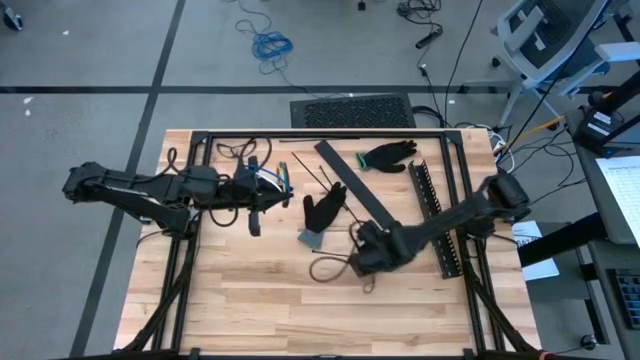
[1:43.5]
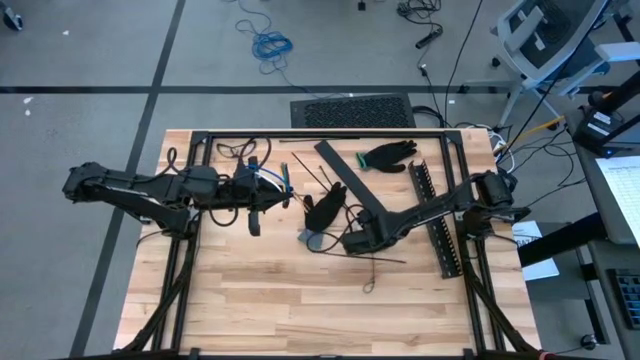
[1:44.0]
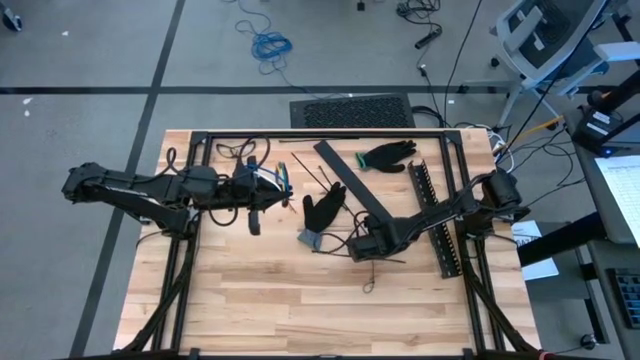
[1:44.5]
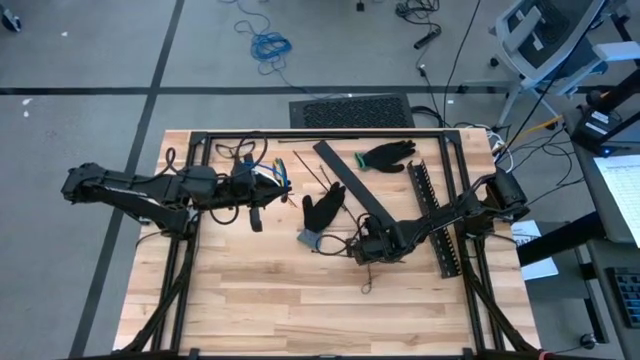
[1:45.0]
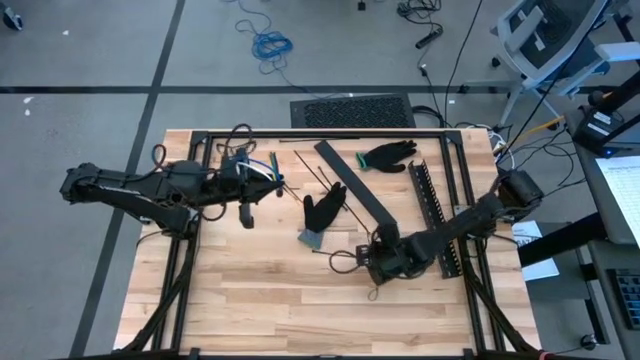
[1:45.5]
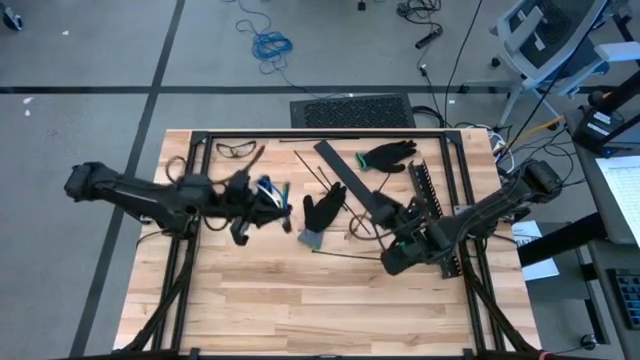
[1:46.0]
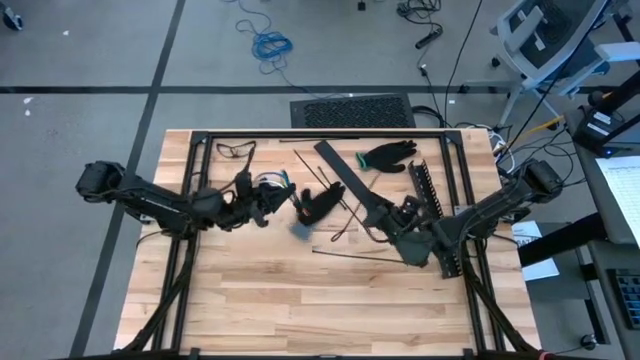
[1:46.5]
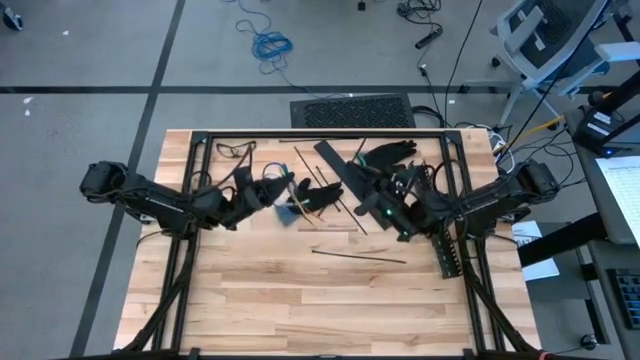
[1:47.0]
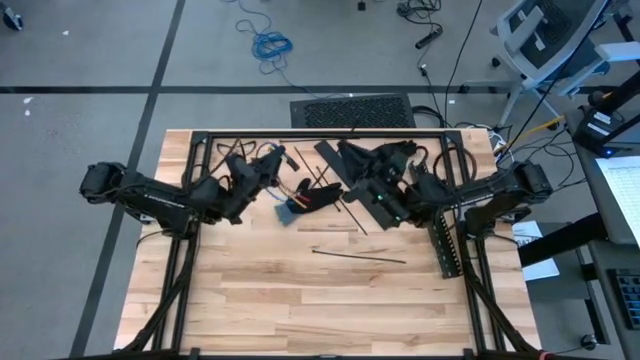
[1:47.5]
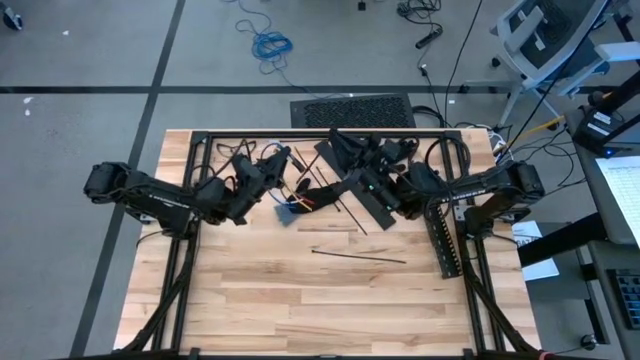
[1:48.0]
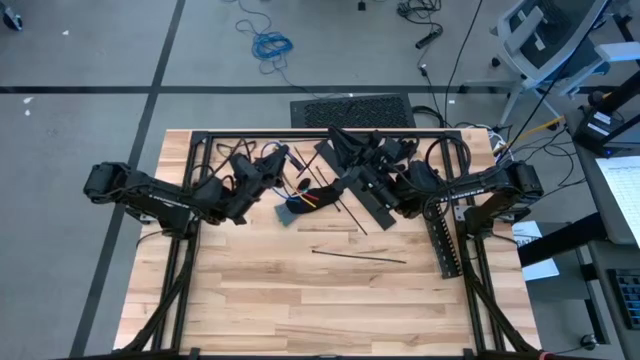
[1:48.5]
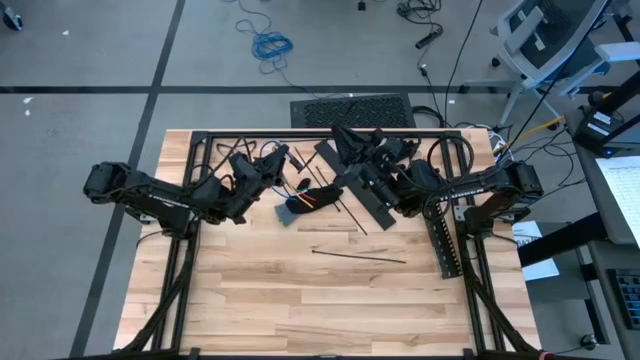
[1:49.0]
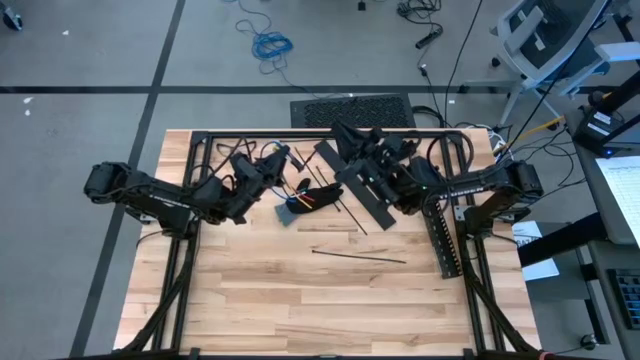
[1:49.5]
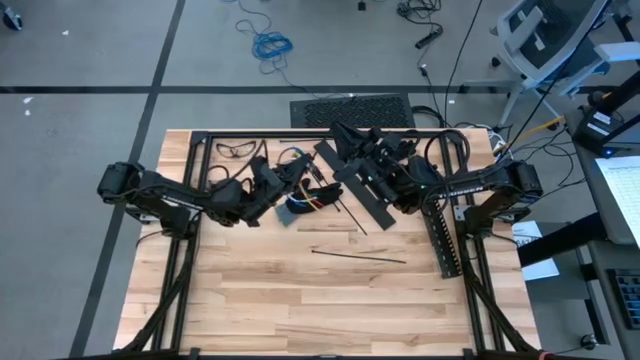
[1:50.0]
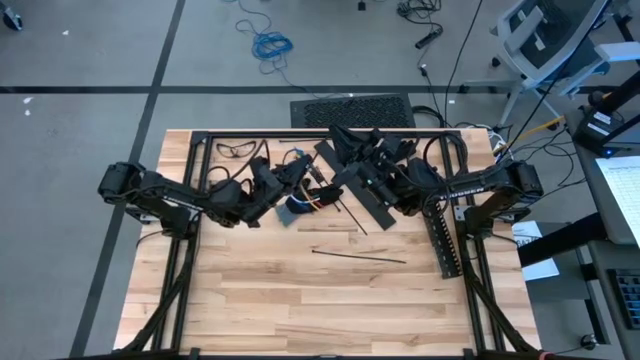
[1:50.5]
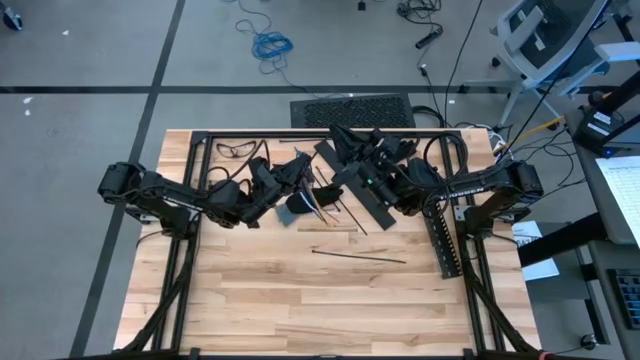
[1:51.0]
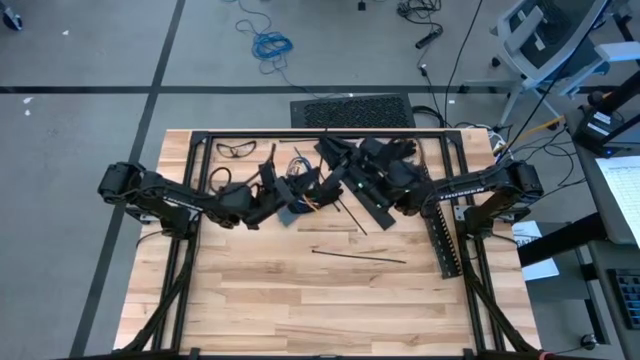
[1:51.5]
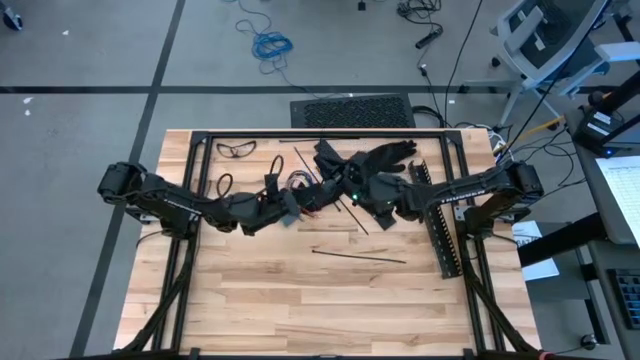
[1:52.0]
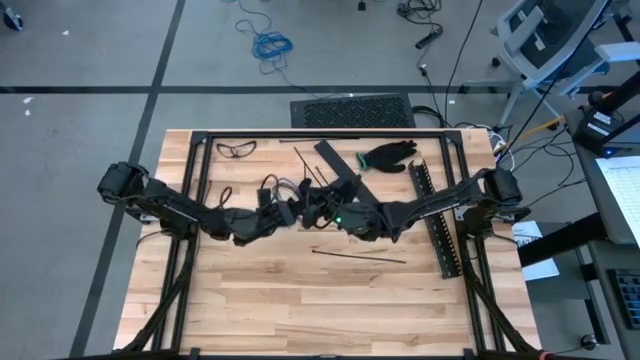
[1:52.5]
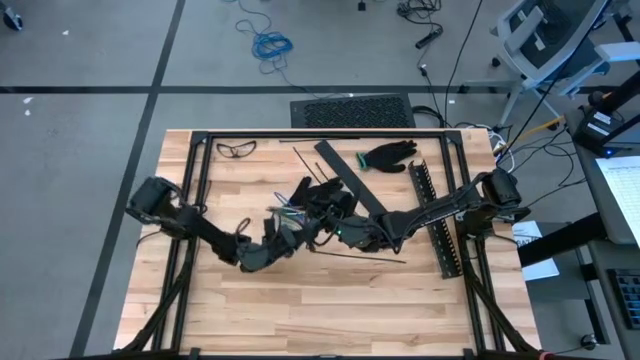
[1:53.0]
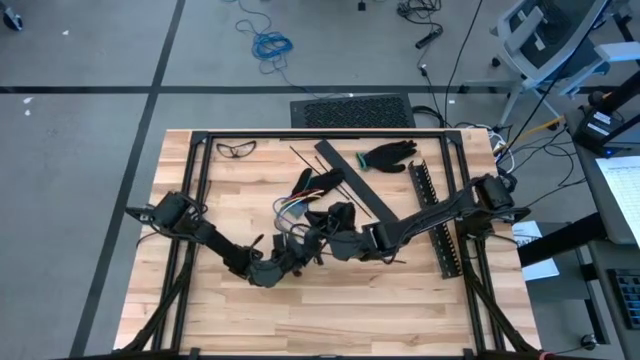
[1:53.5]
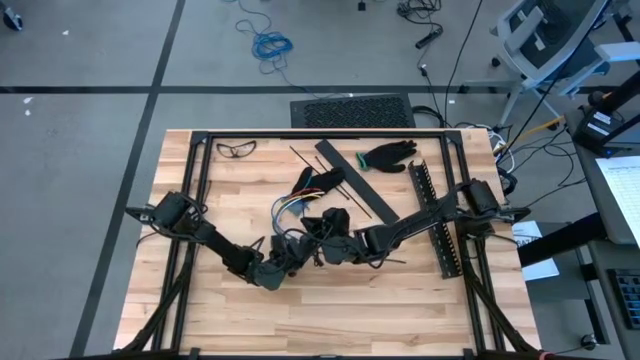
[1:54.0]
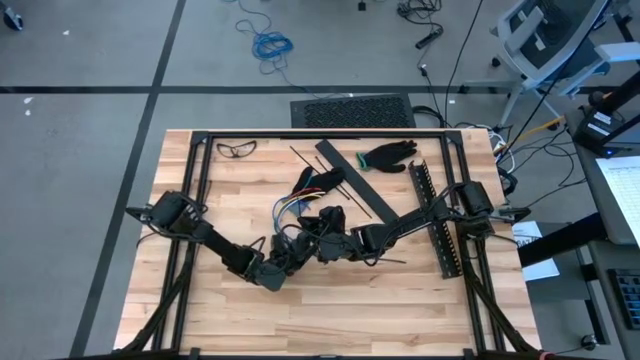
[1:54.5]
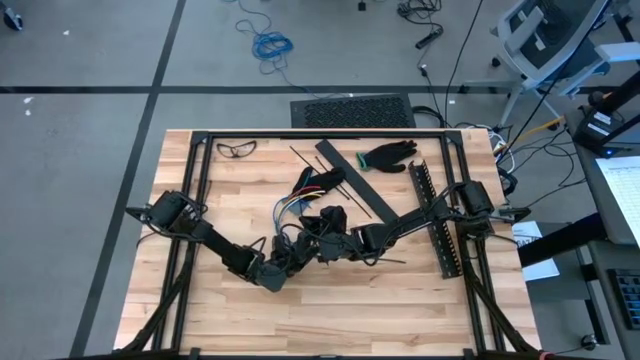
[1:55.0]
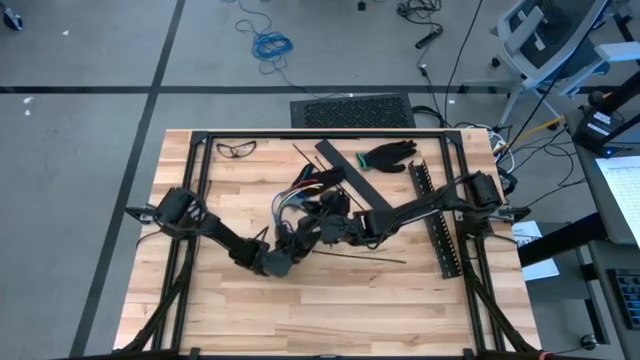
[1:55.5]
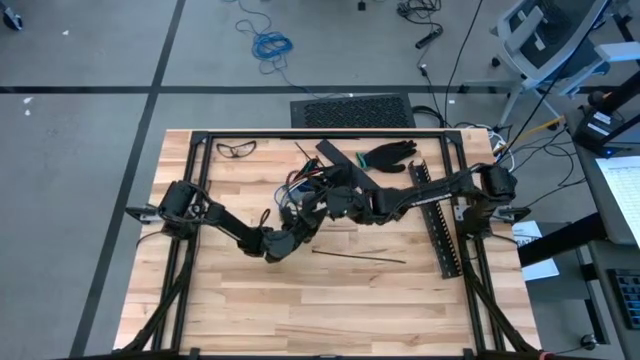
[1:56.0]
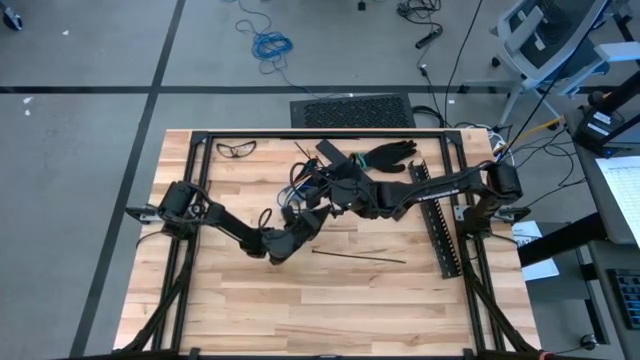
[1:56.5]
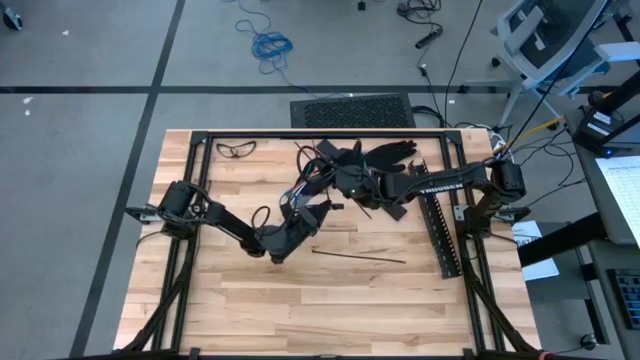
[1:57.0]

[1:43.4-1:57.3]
Task: Ziptie cables
Wrap the black zip tie on the cable

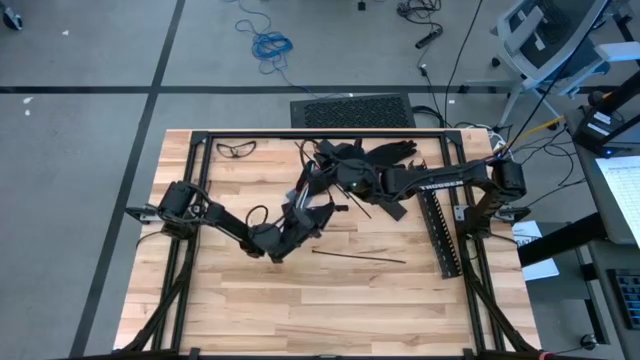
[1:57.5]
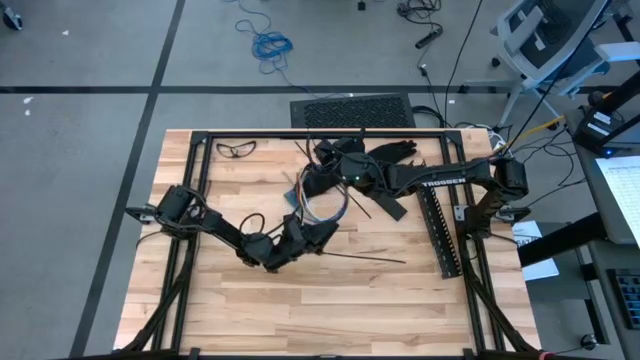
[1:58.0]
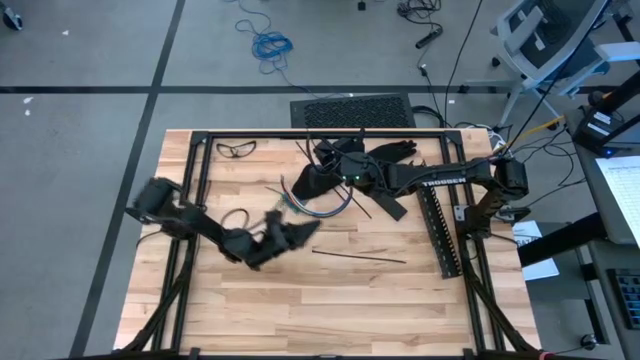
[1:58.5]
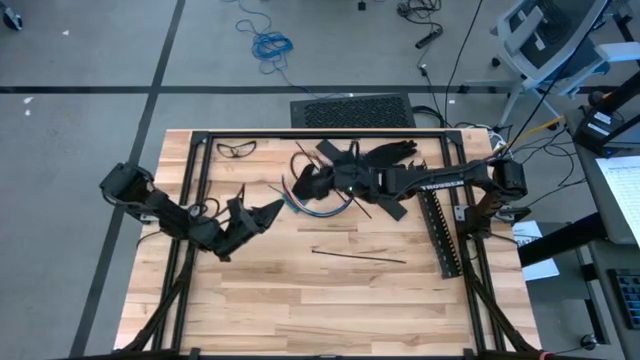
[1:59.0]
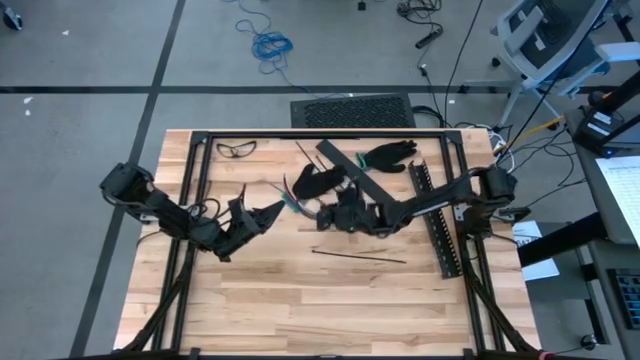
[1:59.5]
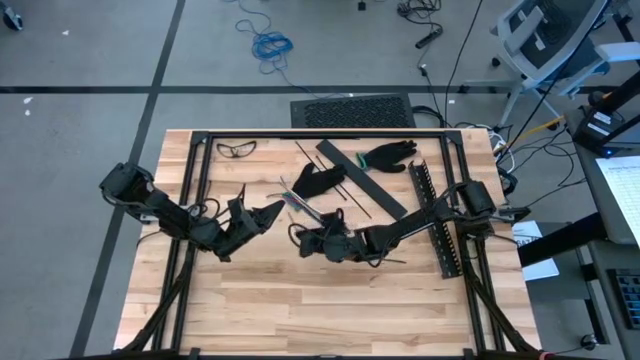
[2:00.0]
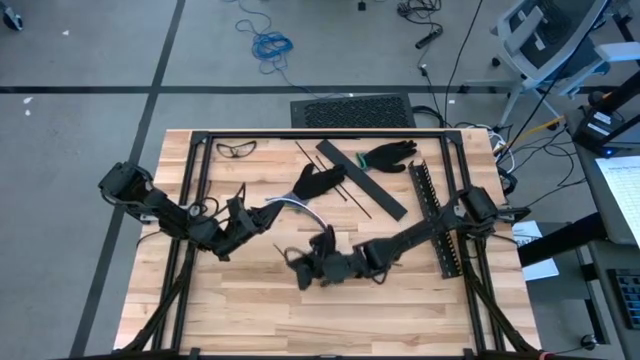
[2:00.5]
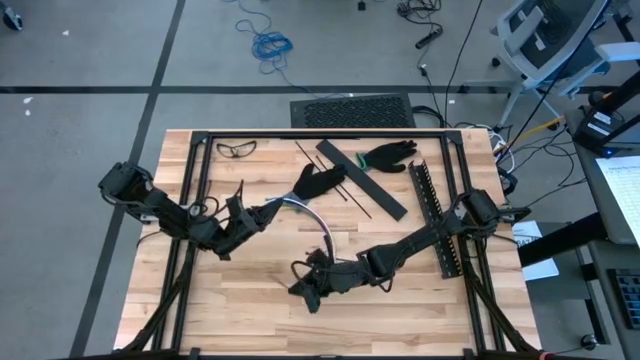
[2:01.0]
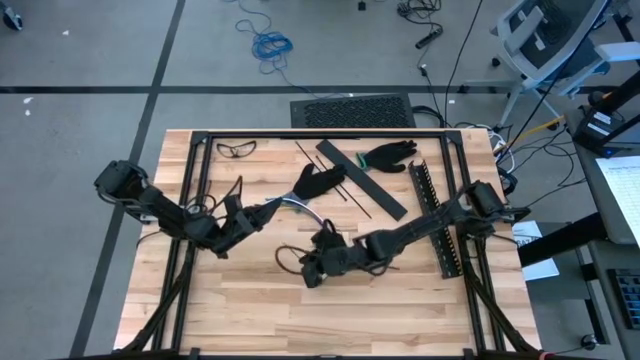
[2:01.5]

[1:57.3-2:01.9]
Wrap the black zip tie on the cable

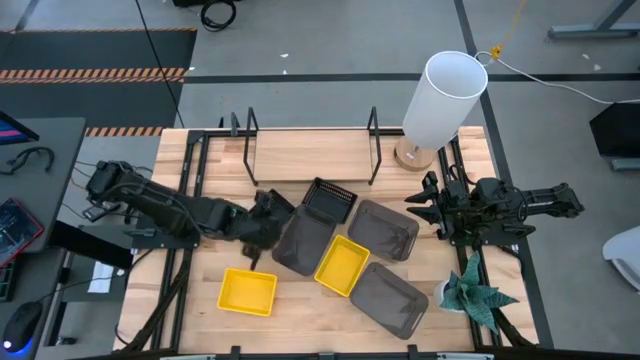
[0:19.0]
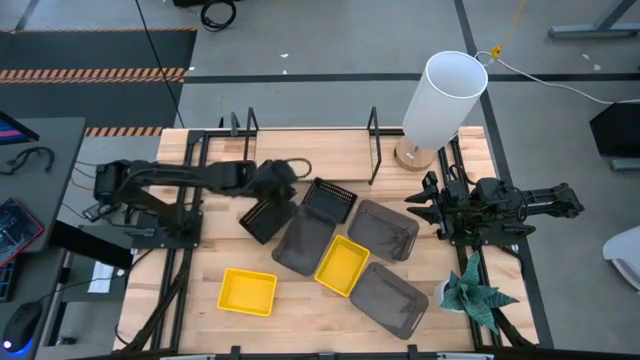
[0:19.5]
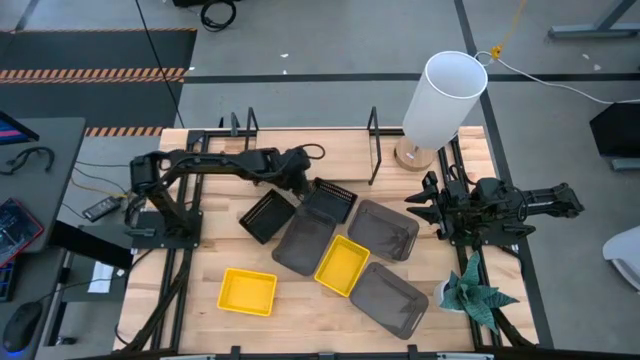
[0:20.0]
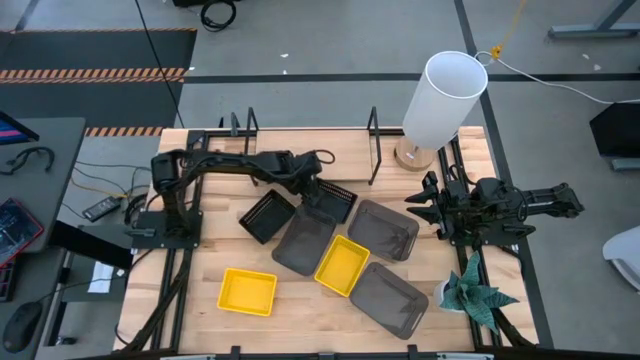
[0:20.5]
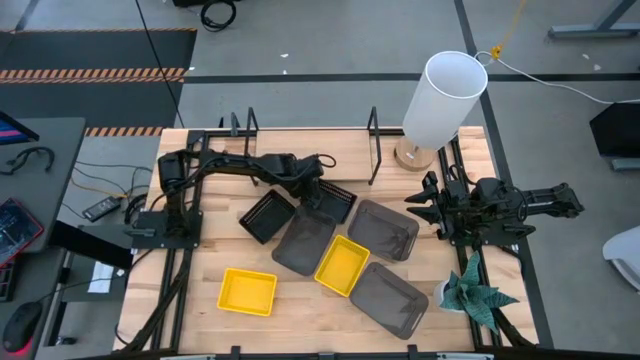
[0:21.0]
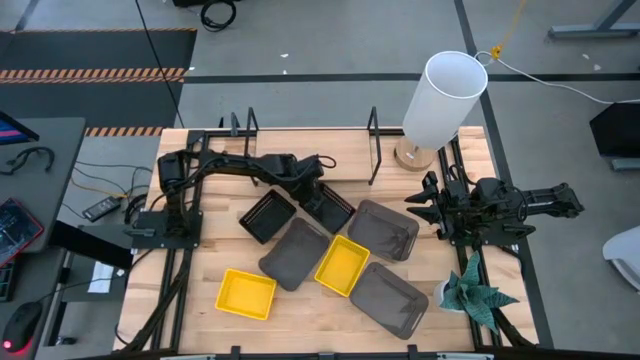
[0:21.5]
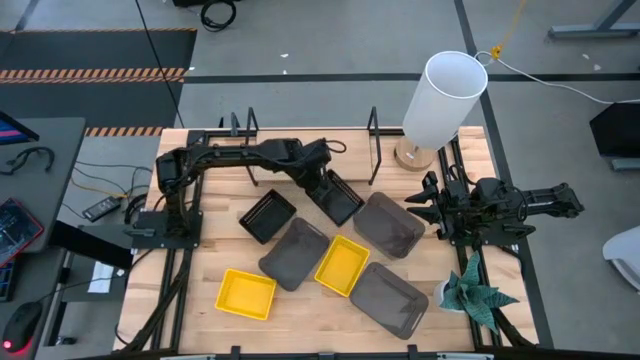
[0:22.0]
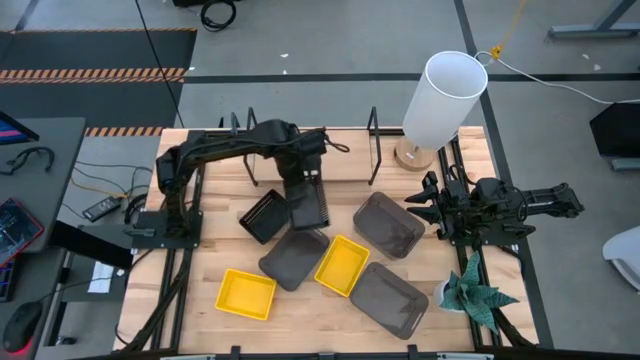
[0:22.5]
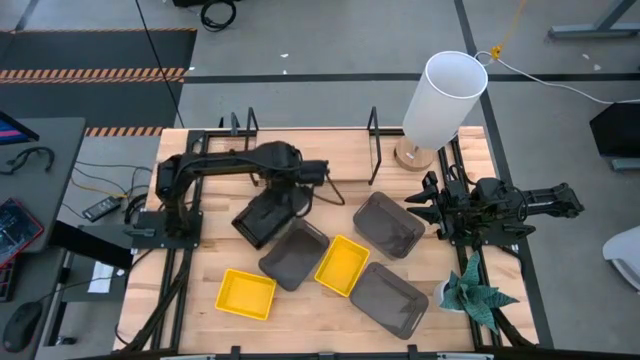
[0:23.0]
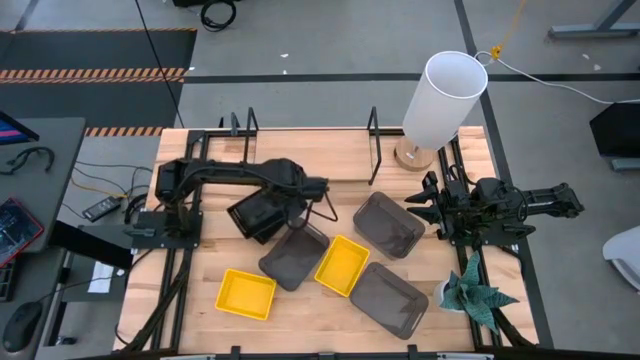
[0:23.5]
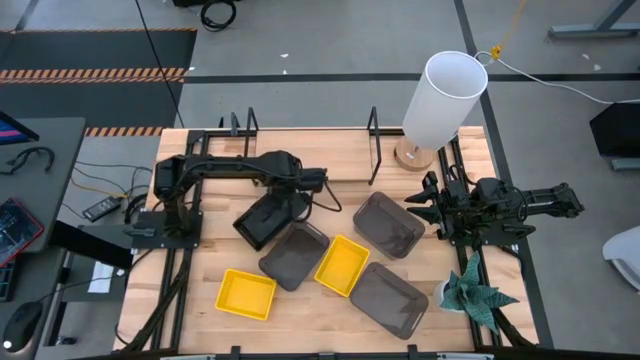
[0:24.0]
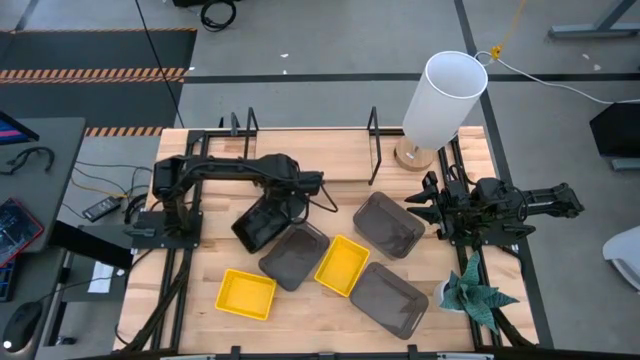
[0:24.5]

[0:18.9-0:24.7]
Task: Stack baskets on shelf by color
Stack the right black bin on top of the left black bin
